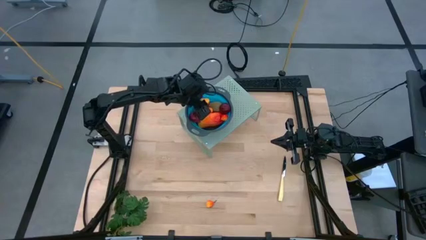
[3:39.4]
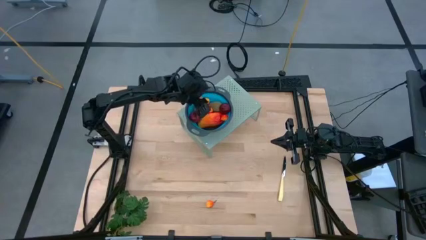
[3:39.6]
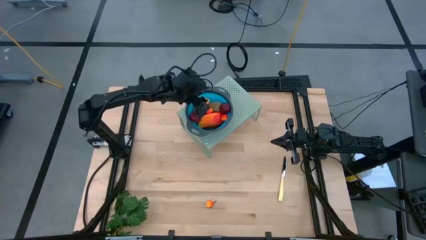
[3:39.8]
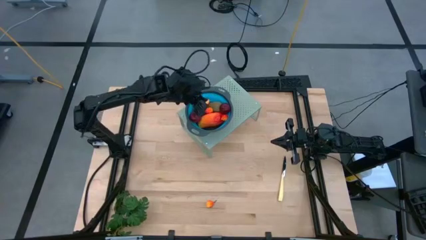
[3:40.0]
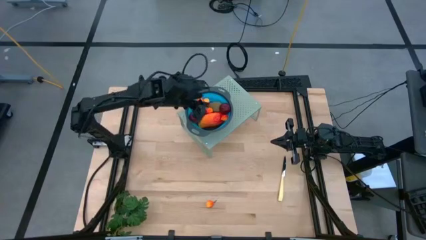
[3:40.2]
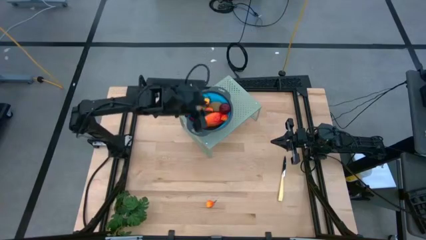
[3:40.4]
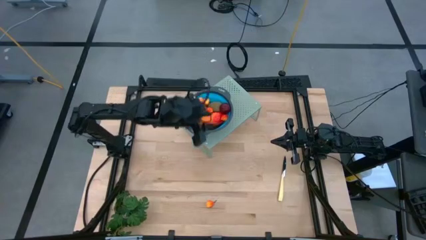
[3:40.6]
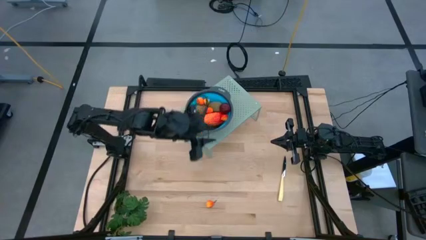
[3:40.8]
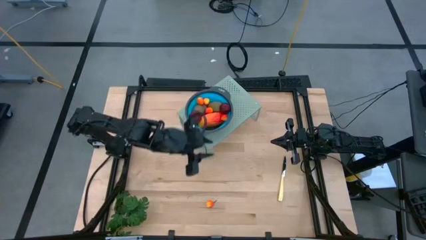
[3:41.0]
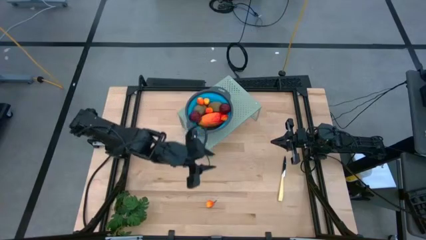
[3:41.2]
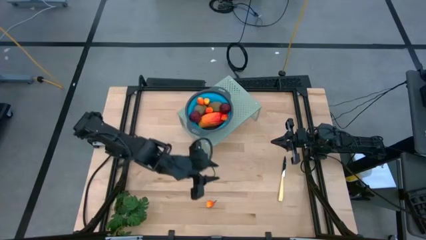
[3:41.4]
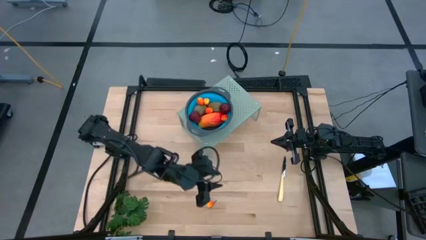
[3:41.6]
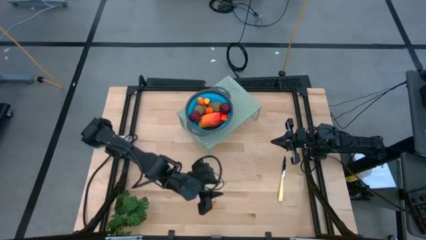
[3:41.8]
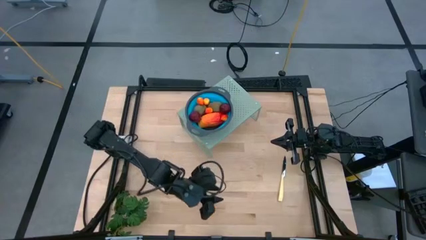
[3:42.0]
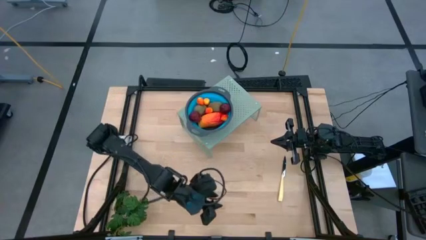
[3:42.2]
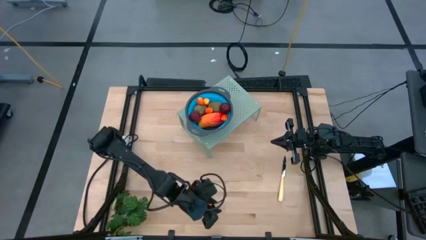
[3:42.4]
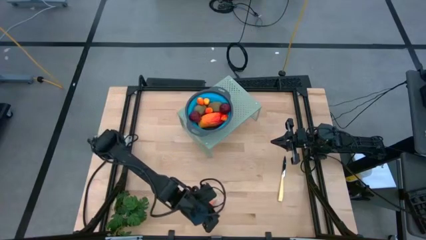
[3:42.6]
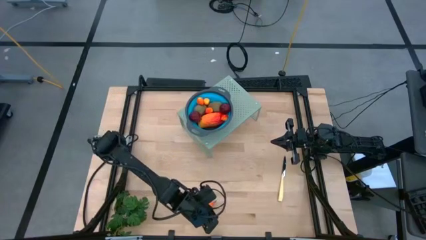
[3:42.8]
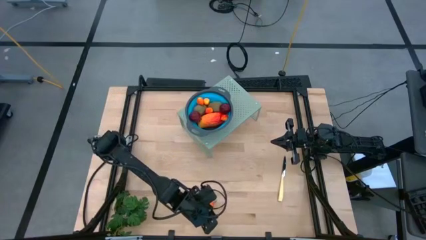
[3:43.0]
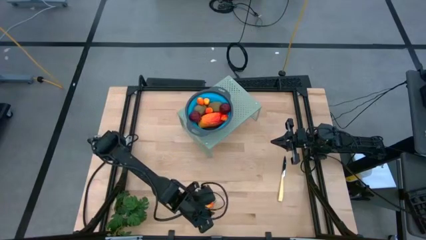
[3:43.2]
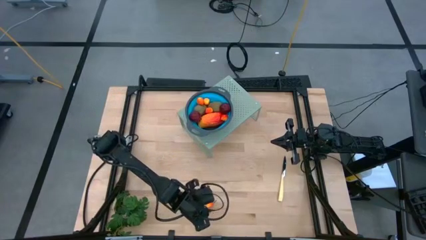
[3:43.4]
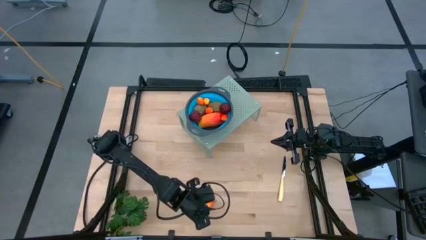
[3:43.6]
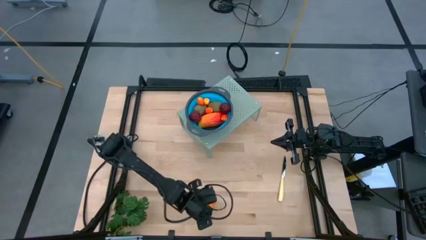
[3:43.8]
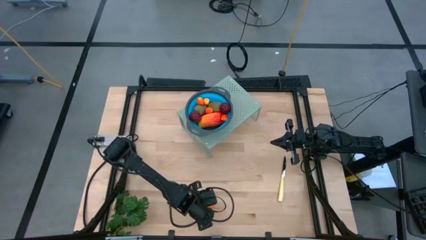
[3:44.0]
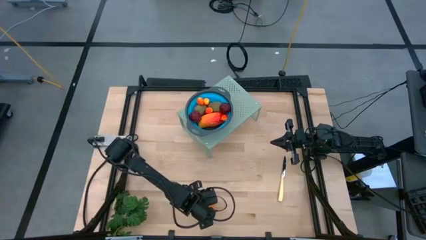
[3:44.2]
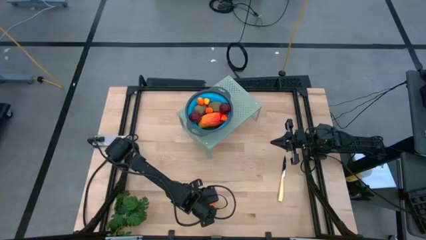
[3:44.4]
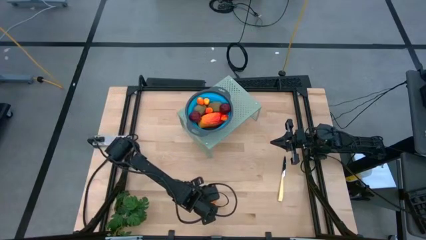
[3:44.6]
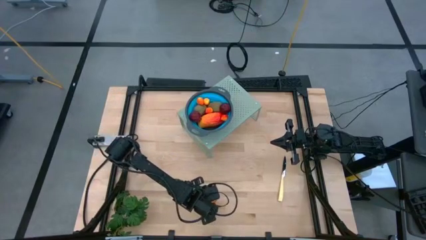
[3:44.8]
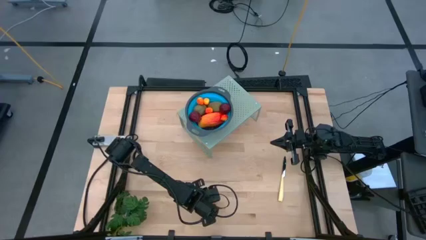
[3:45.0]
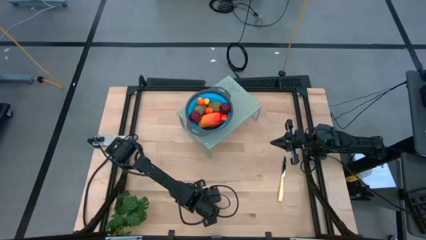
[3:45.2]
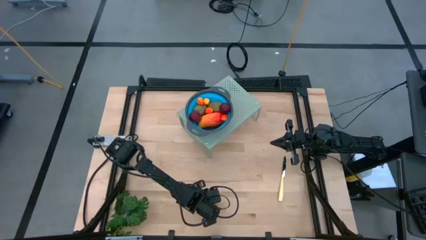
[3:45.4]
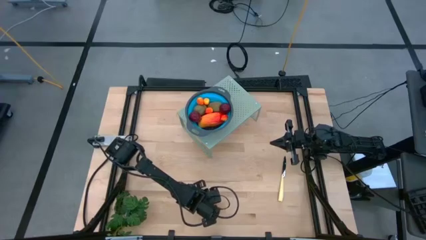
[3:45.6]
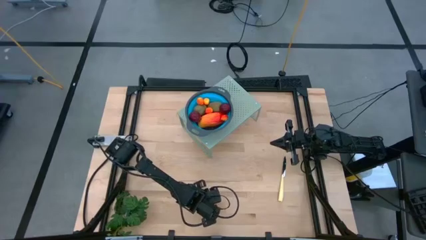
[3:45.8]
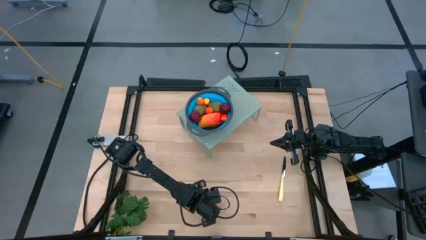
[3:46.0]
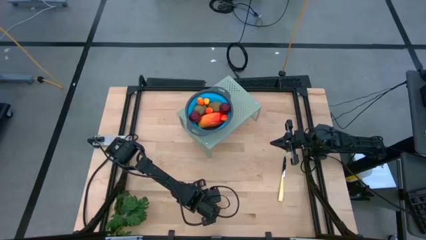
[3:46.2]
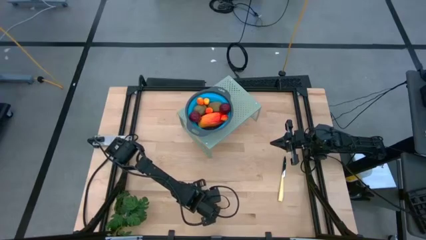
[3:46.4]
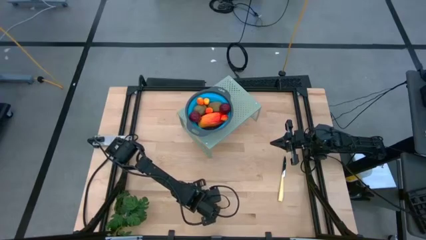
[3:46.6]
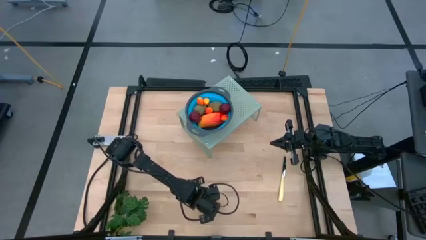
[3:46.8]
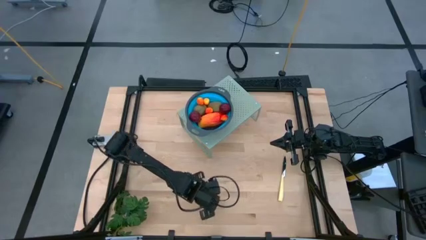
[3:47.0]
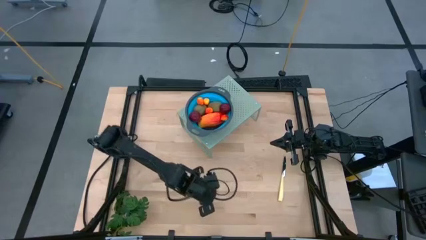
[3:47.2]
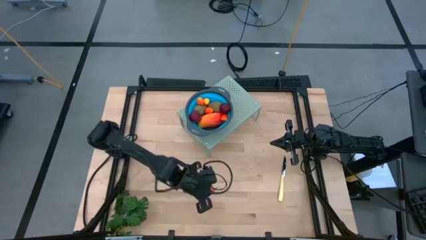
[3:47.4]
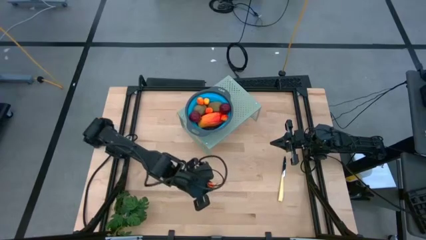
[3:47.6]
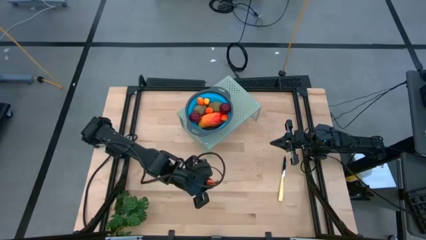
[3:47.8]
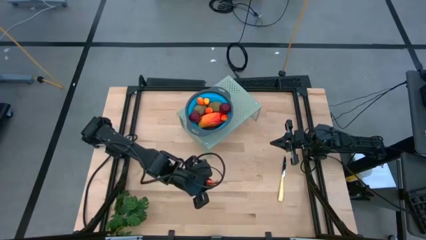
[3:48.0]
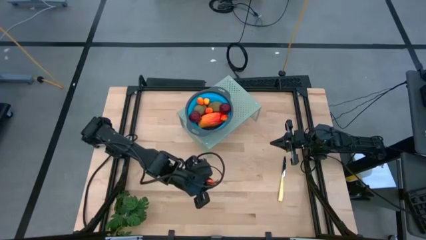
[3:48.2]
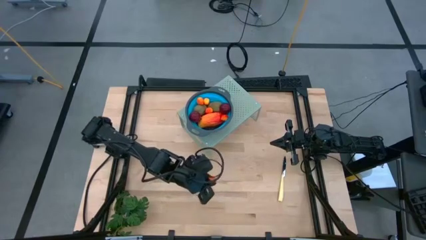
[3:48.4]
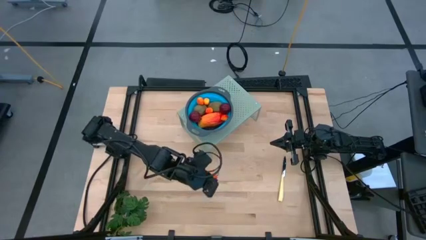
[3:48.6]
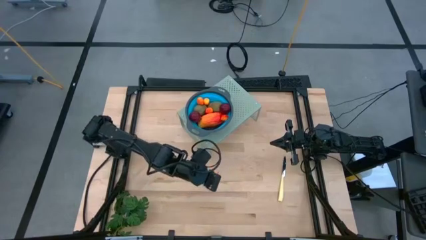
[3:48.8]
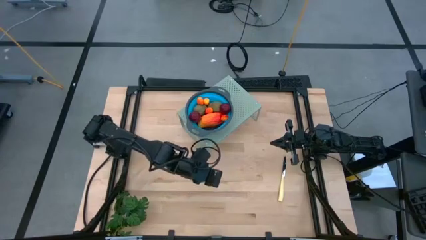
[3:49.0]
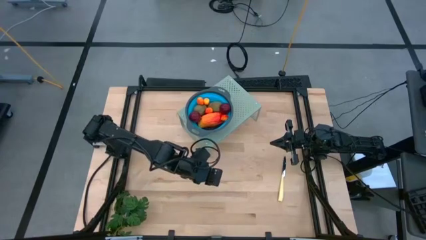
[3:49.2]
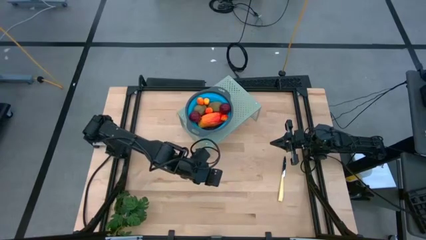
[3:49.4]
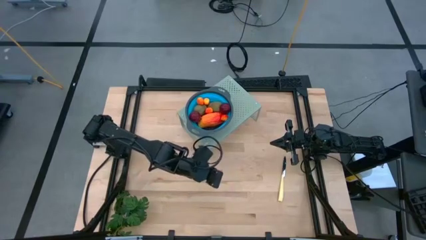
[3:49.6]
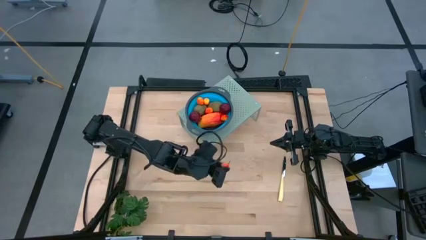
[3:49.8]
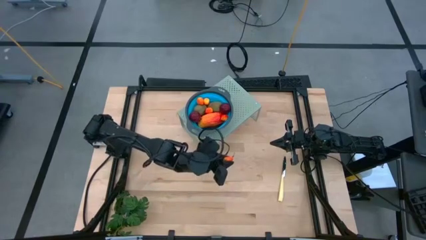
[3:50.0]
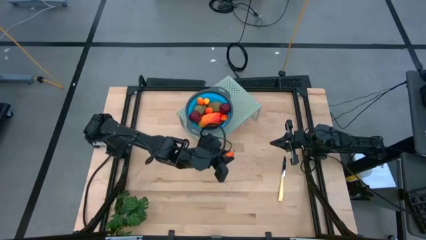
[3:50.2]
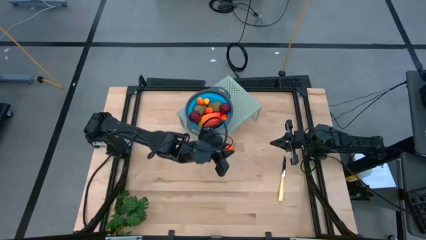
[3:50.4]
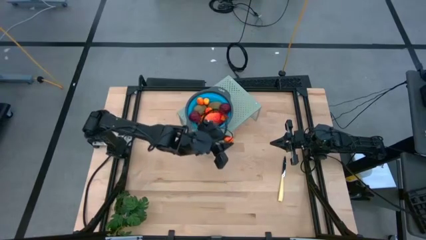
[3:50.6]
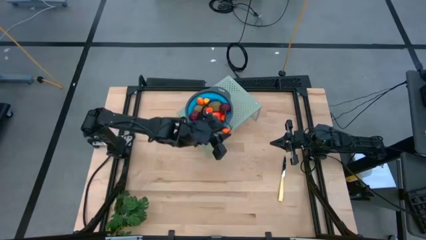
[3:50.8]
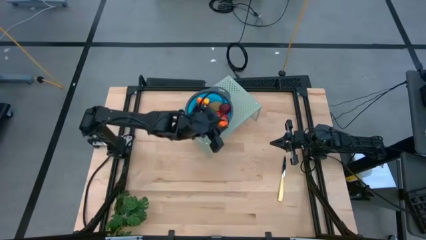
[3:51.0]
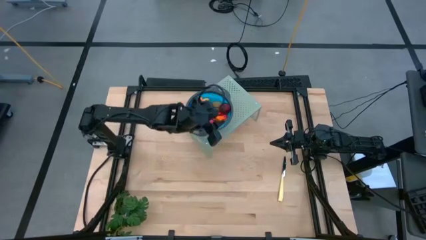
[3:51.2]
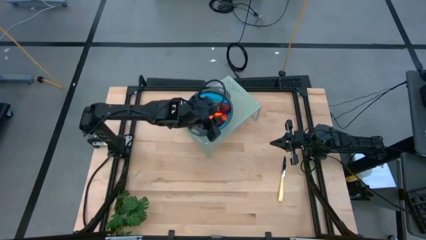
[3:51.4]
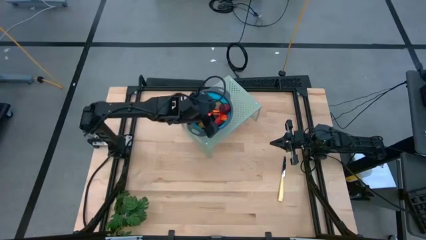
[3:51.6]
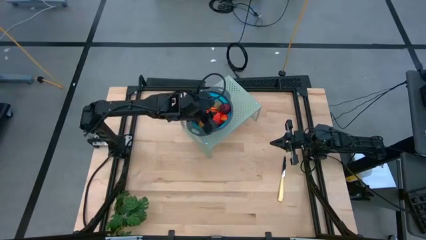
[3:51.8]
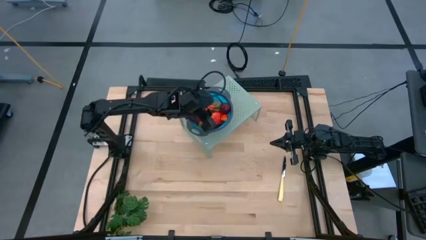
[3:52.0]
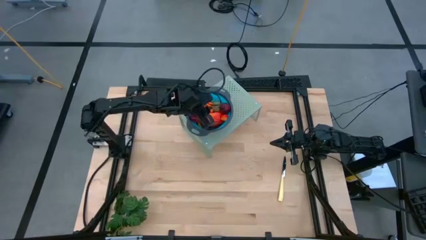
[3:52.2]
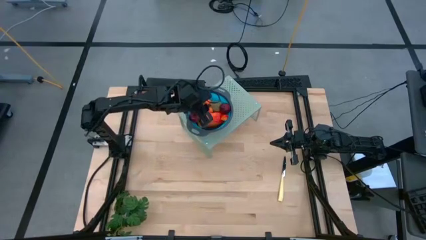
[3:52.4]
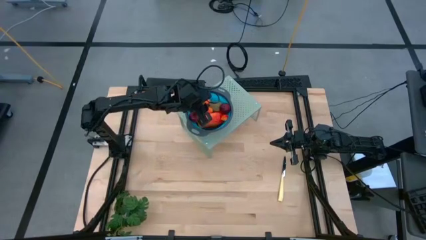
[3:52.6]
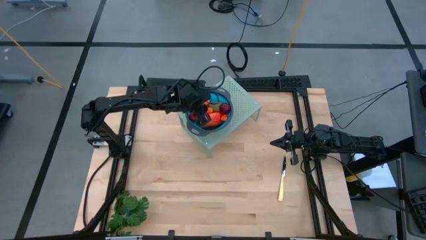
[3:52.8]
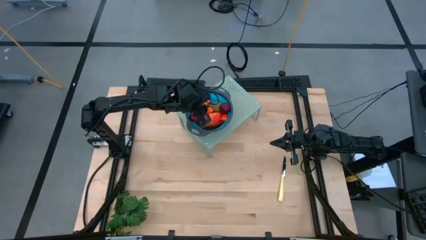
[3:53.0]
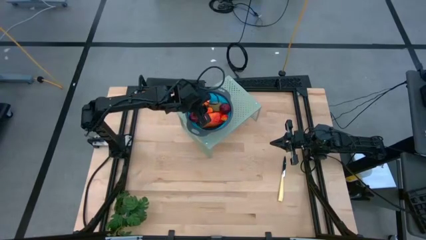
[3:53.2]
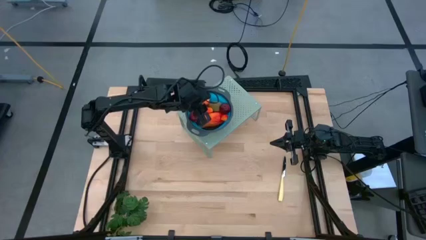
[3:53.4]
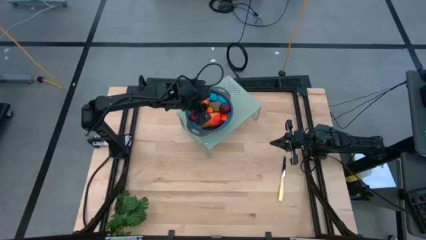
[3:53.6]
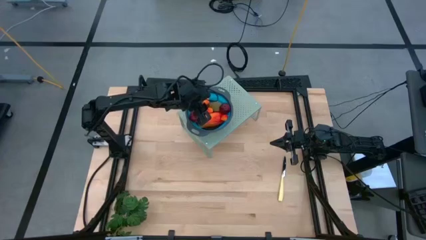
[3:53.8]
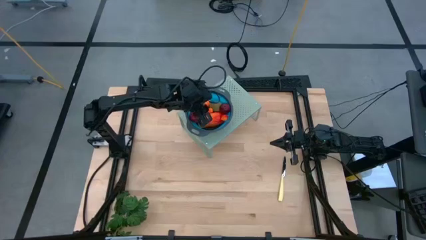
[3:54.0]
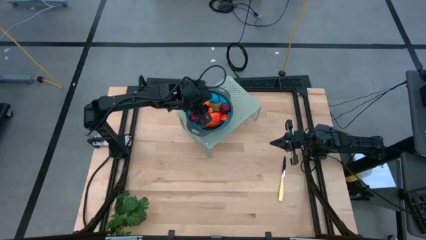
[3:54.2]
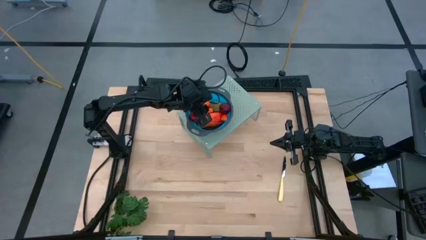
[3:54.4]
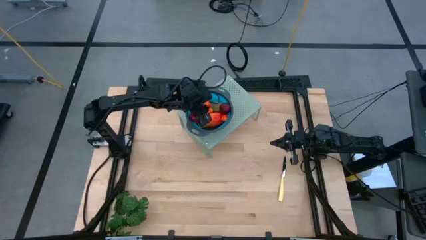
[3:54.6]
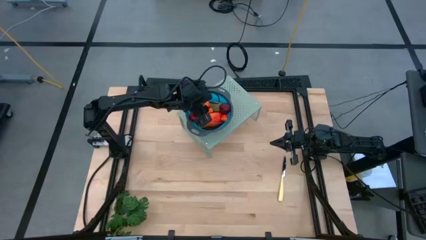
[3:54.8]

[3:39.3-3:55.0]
Task: Pick & Place Fruit
Put the peach into the blue strainer bowl on the shelf
